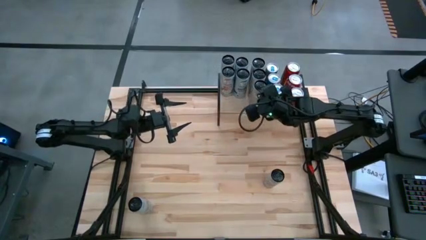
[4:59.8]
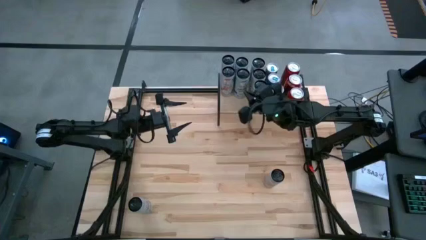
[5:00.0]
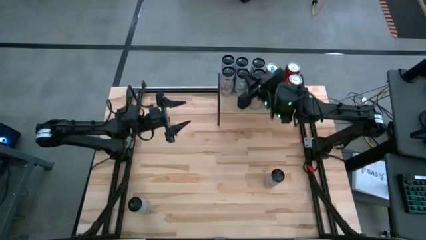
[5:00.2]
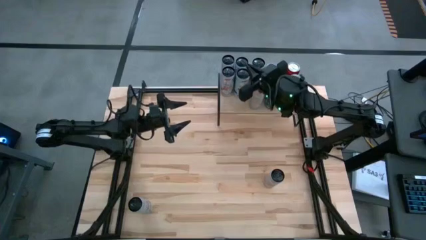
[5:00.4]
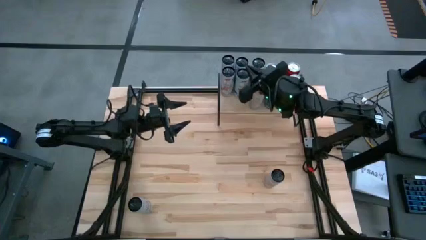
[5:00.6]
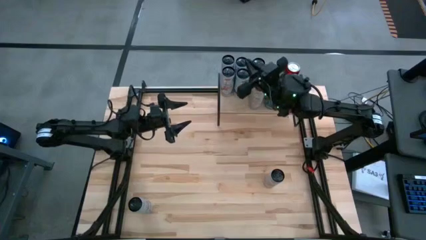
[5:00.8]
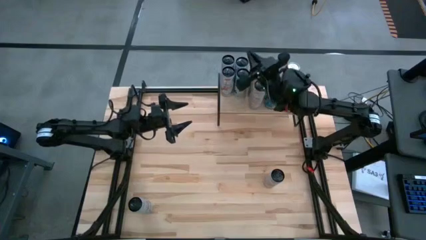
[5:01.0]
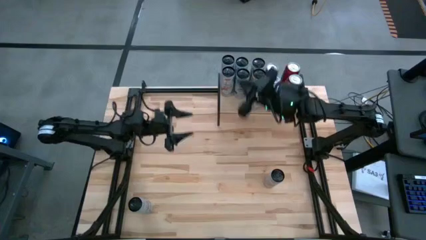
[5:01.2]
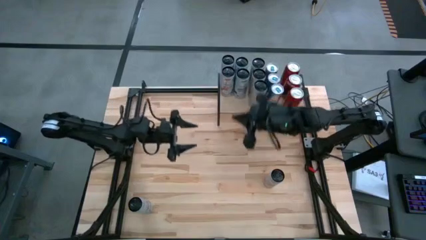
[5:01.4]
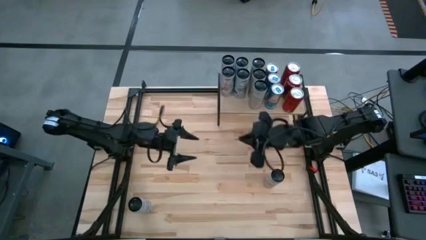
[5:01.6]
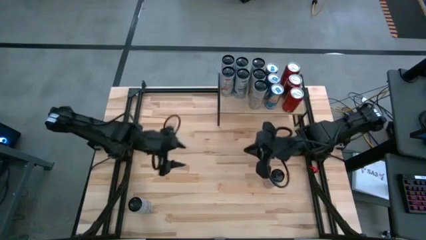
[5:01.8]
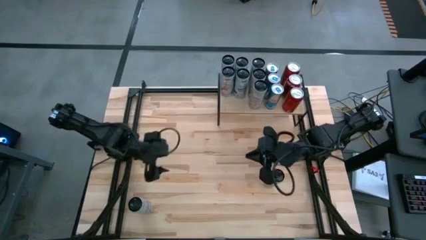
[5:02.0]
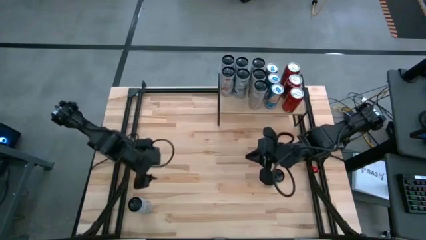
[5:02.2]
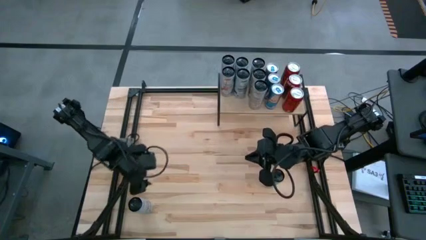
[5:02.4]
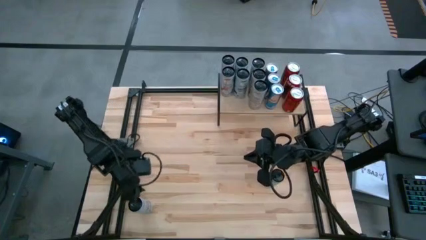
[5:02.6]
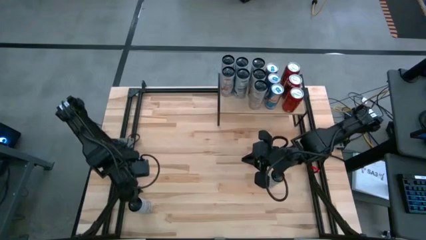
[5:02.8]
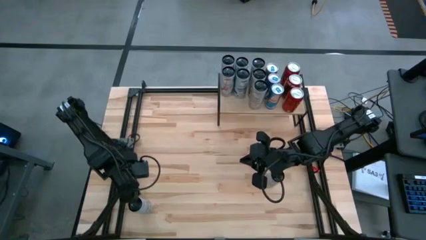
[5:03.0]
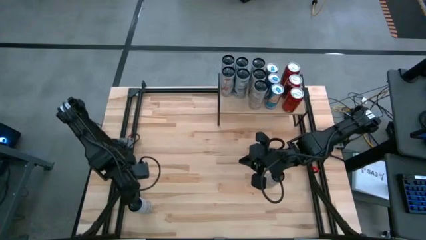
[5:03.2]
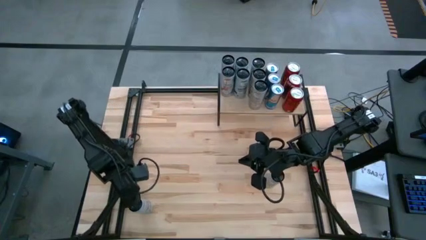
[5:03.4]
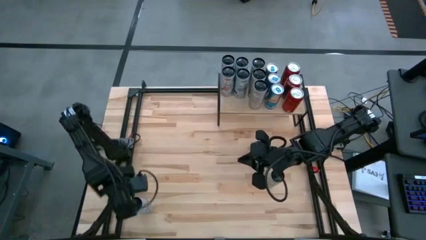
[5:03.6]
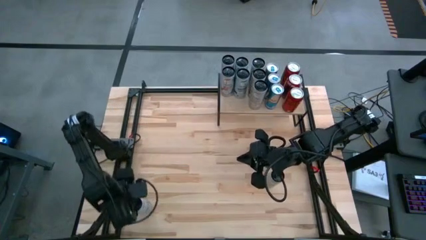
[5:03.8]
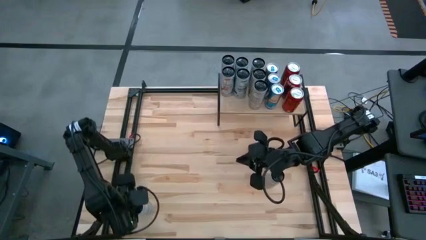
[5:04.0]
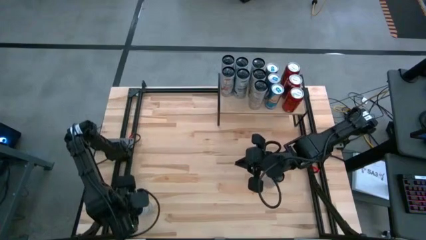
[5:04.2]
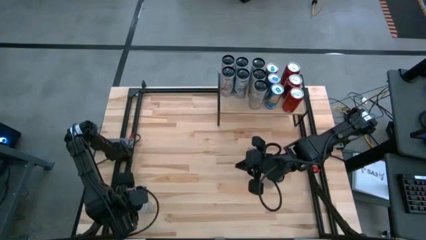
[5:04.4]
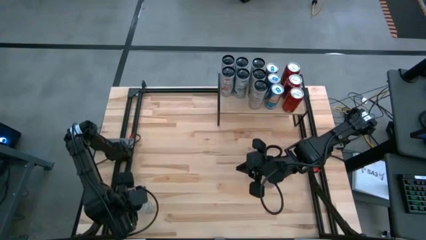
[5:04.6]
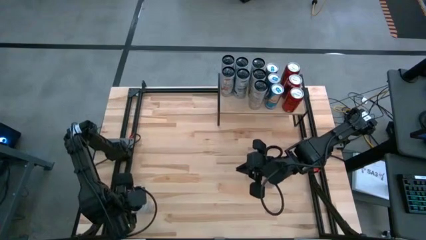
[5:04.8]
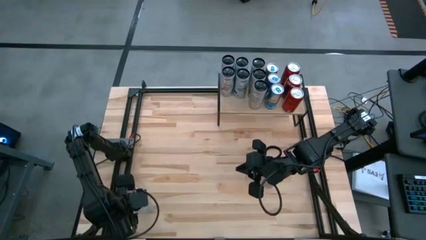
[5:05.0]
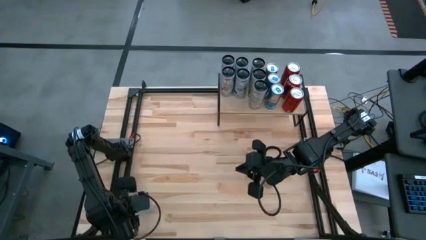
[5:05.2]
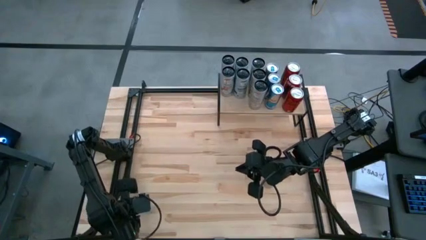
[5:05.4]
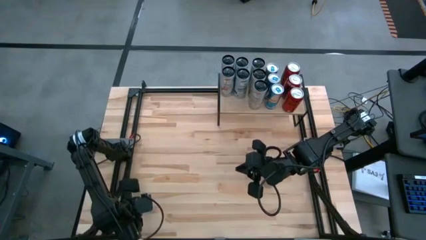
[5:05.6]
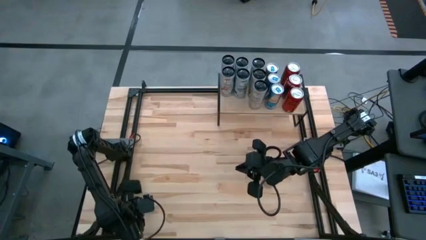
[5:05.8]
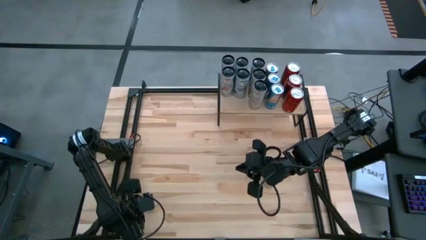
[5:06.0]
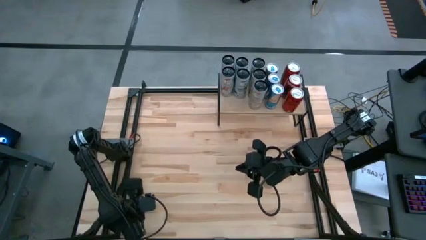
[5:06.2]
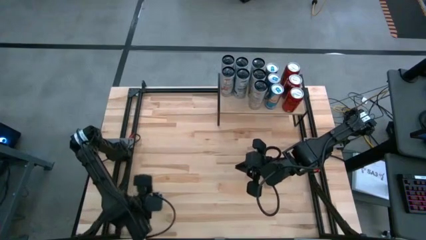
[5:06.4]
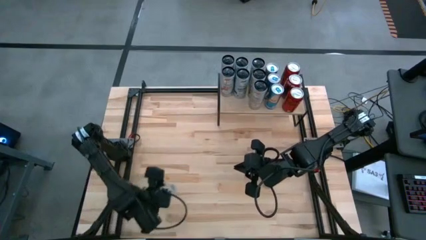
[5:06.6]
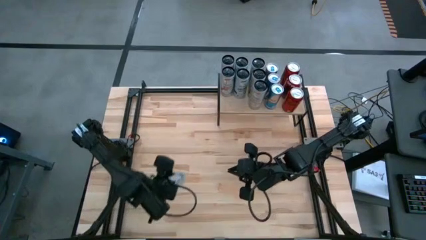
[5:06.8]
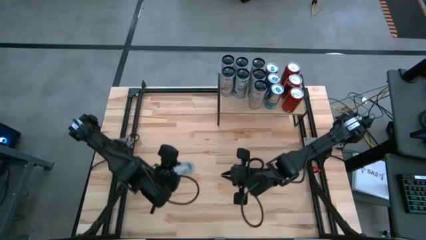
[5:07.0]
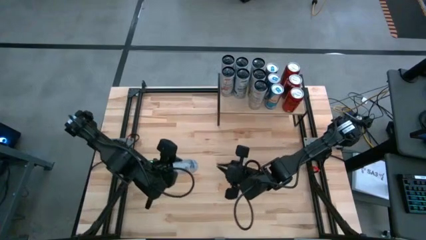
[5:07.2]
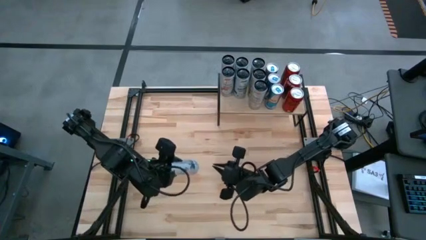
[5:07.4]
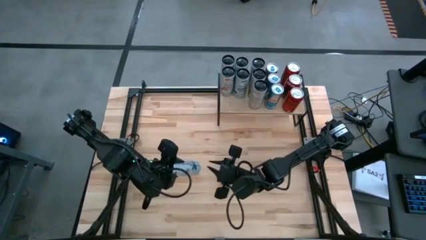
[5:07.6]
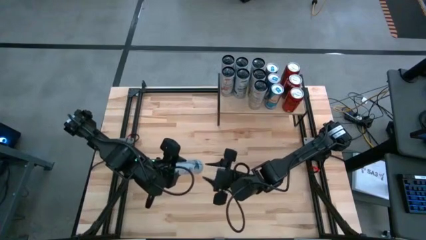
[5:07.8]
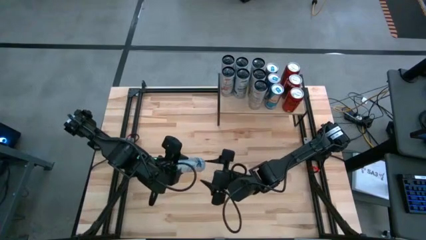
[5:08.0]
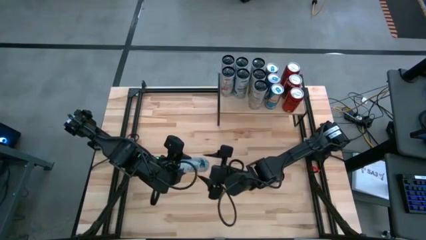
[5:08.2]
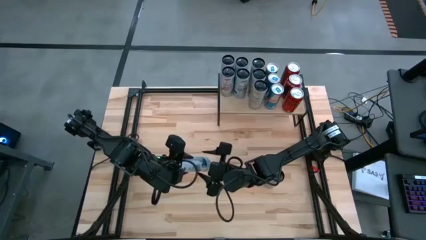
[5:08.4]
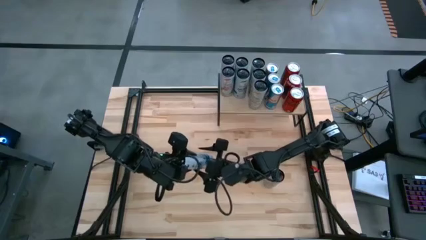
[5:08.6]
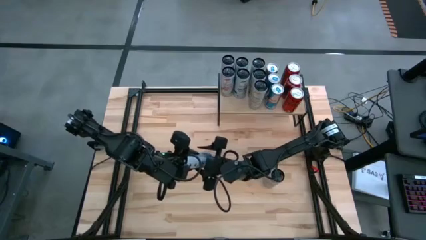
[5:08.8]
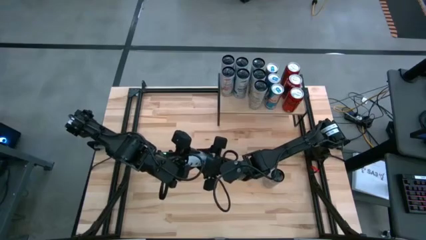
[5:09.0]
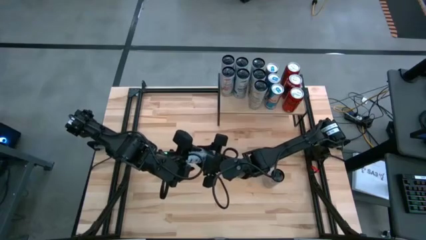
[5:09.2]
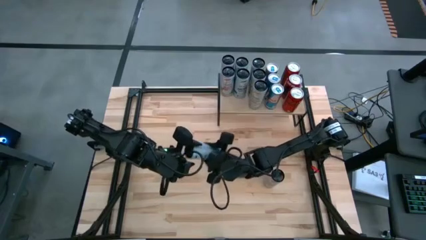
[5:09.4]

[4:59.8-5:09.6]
Task: Place canned beverage on shelf
Put the white blue soda can on the shelf aligned with the other white blue soda cans

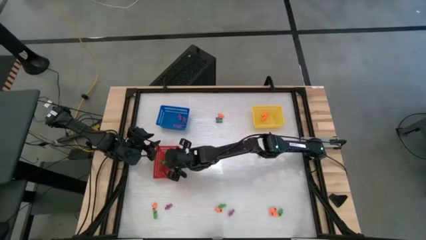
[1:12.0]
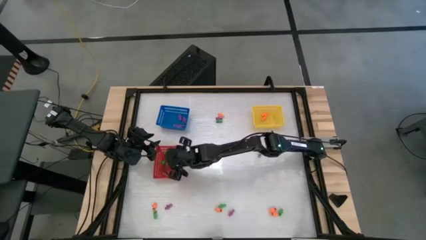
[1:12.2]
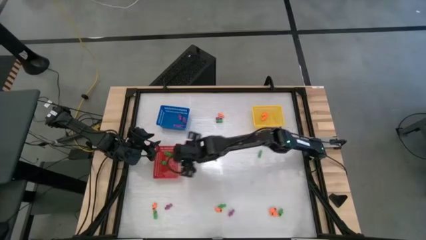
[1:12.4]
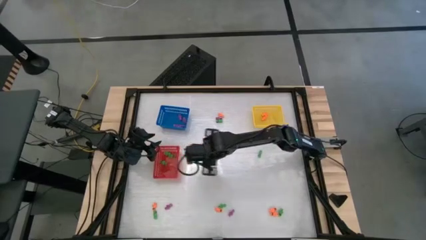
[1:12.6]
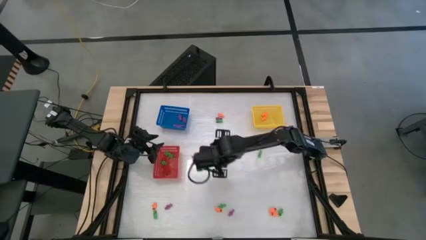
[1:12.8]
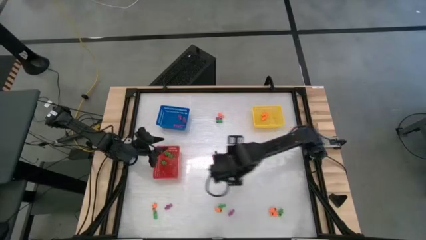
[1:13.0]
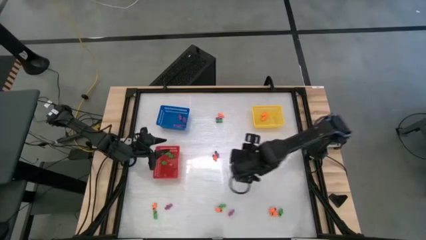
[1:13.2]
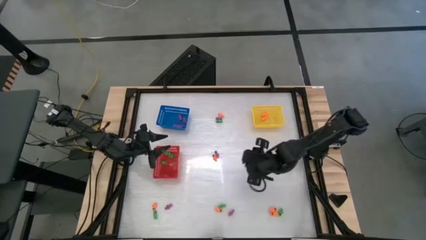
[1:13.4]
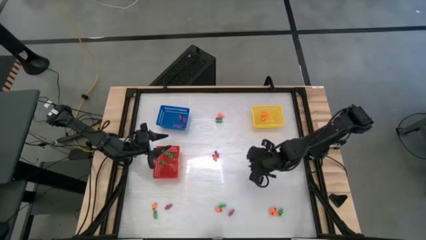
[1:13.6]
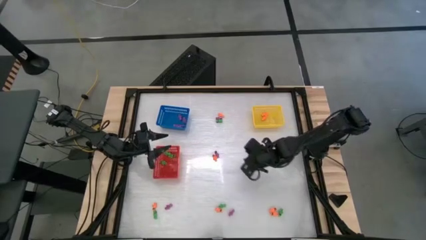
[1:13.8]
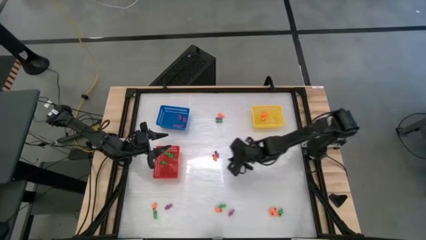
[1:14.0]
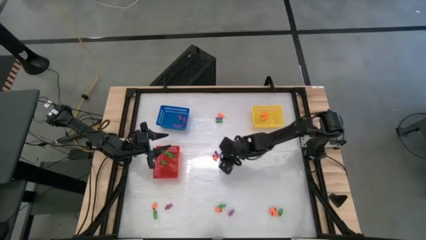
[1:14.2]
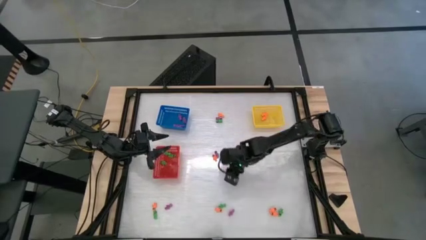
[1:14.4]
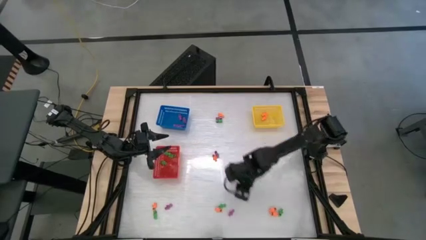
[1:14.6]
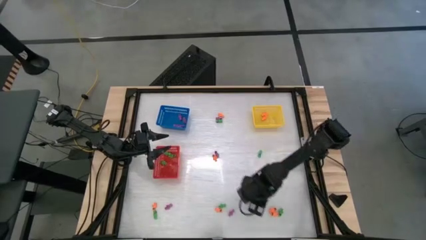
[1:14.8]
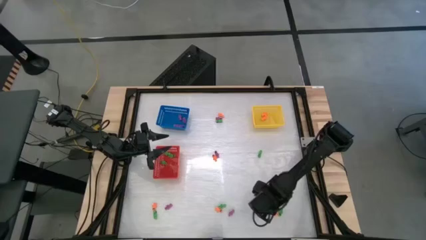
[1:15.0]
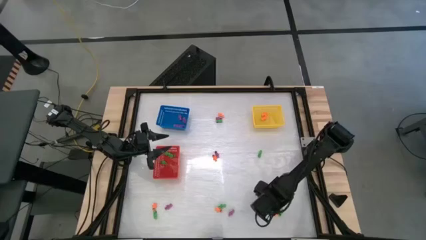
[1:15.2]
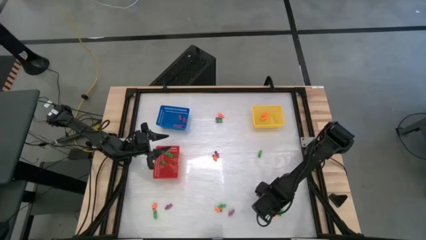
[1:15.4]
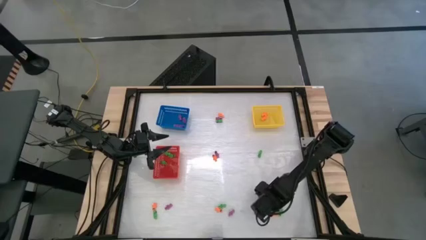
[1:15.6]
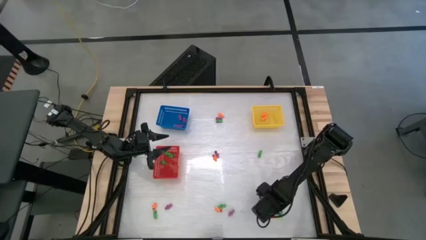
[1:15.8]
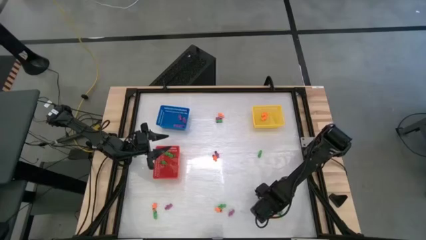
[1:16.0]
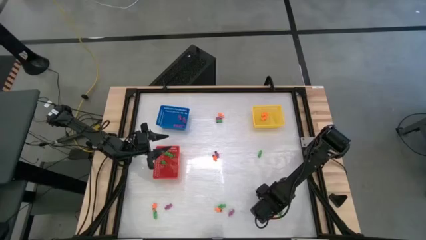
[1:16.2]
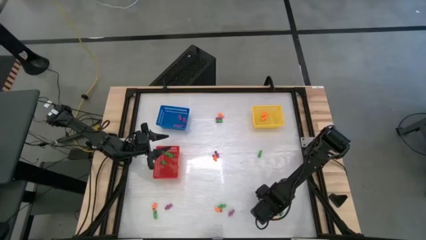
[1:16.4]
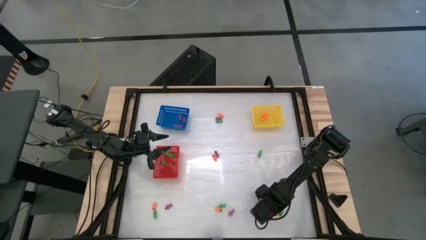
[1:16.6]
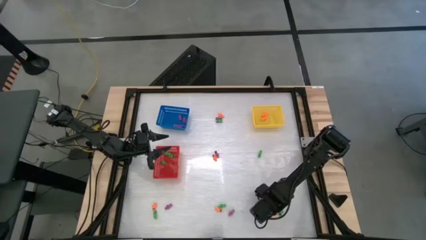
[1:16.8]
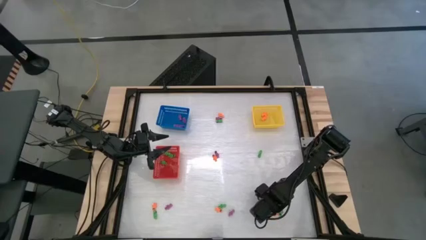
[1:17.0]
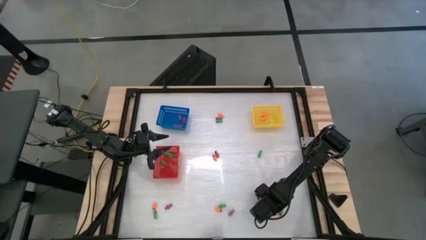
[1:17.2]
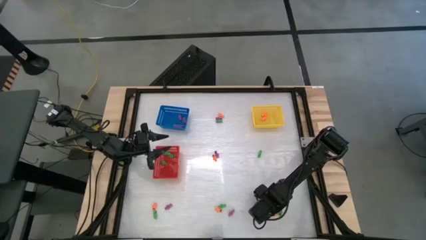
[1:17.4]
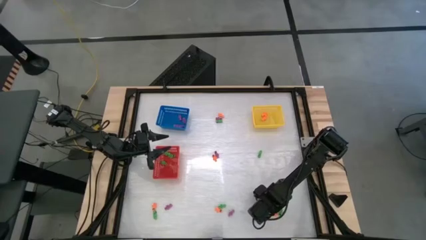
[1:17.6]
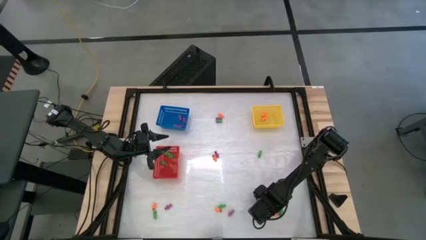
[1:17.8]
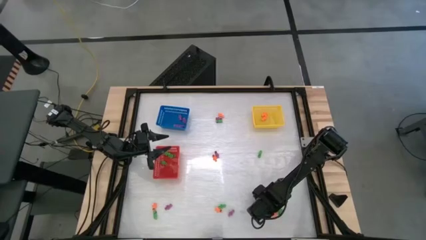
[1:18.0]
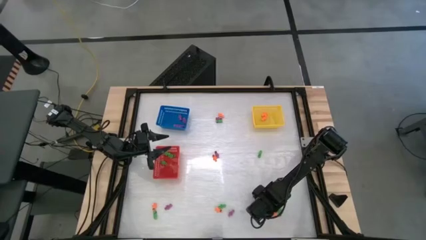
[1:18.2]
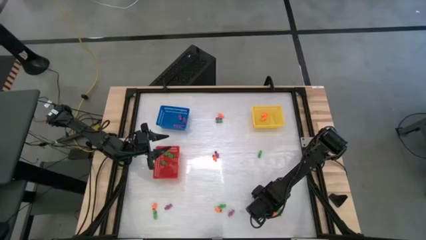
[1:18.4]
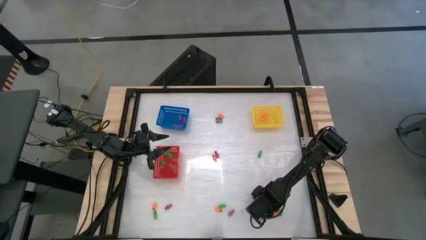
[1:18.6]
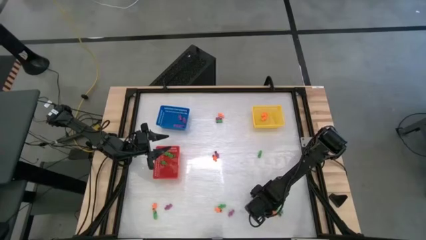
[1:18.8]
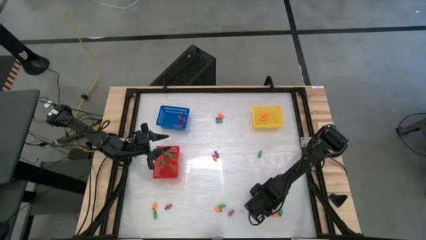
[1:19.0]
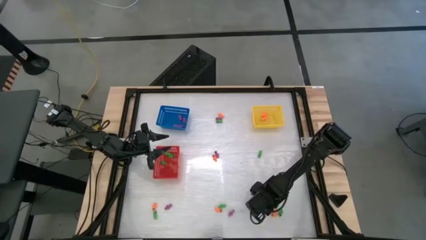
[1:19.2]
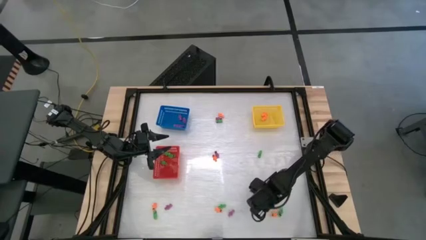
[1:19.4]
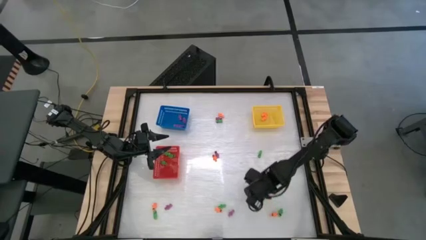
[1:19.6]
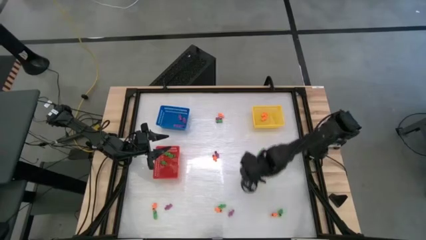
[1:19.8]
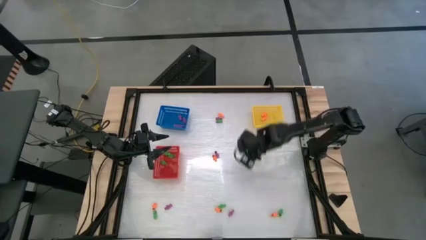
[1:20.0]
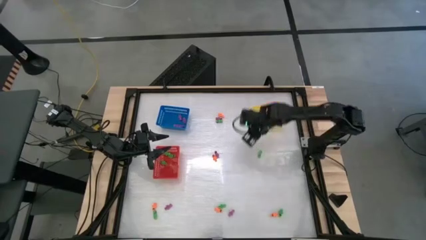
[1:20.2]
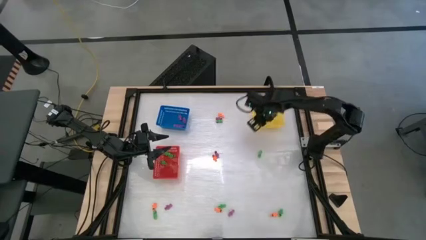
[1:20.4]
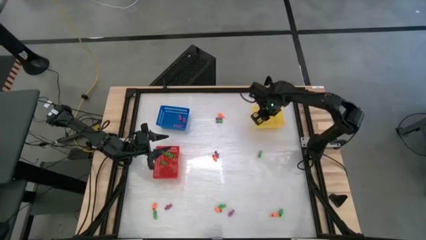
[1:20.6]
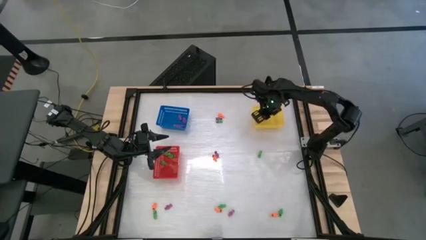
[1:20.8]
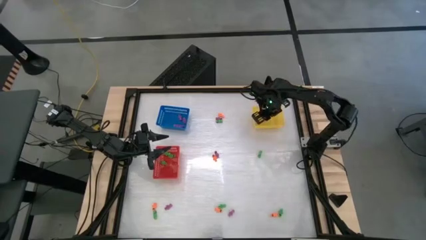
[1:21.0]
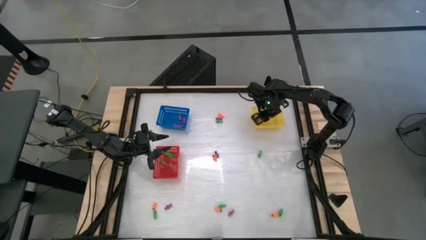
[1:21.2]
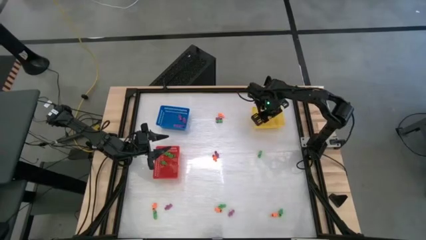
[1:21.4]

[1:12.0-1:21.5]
Task: Sort Halloween decoration
Put the orange skeleton toy into the yellow bin
